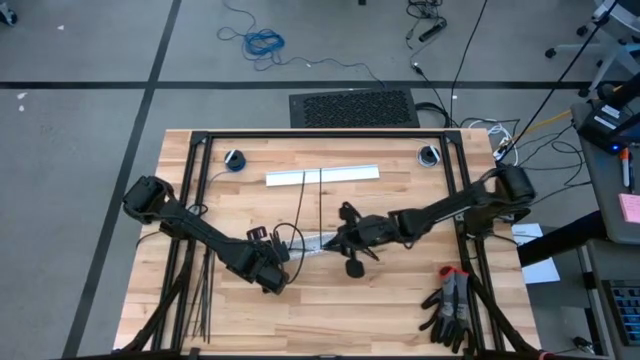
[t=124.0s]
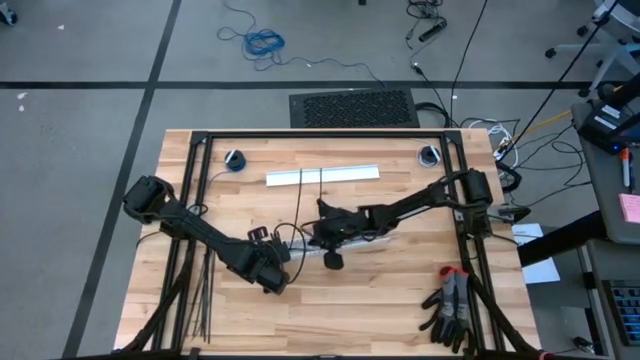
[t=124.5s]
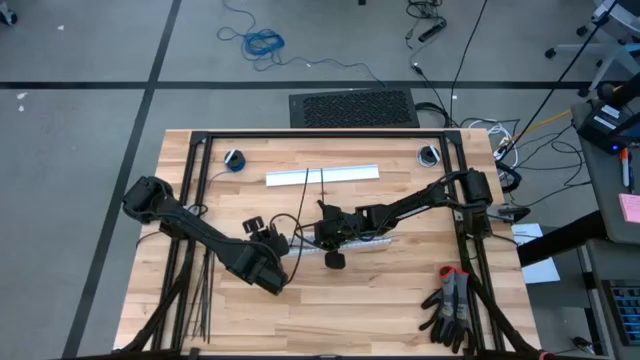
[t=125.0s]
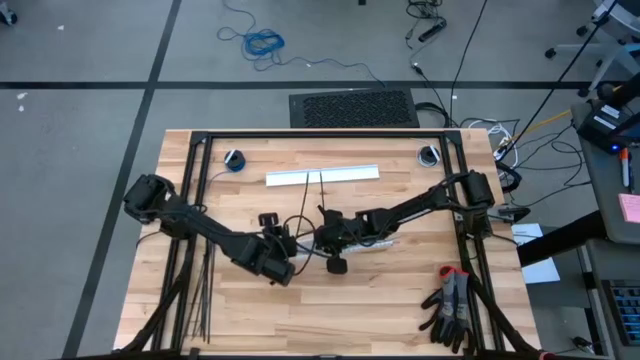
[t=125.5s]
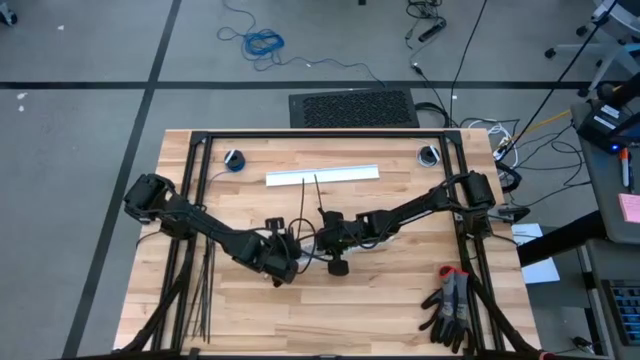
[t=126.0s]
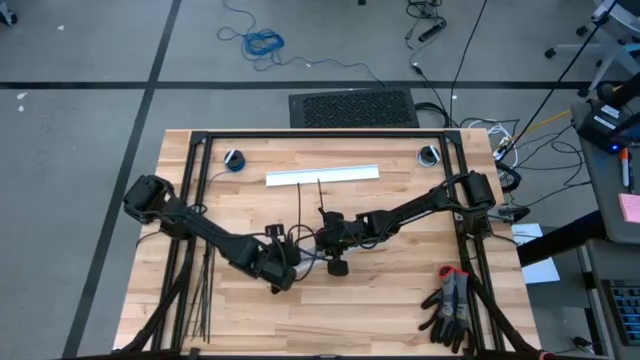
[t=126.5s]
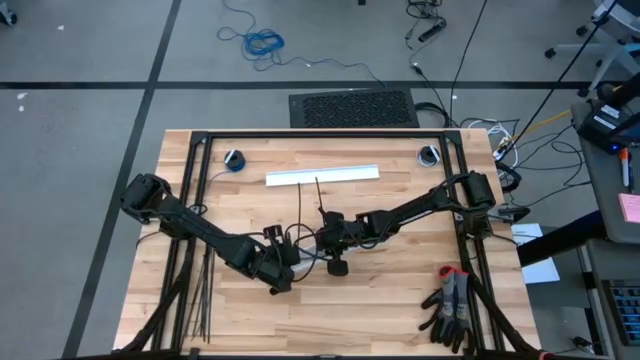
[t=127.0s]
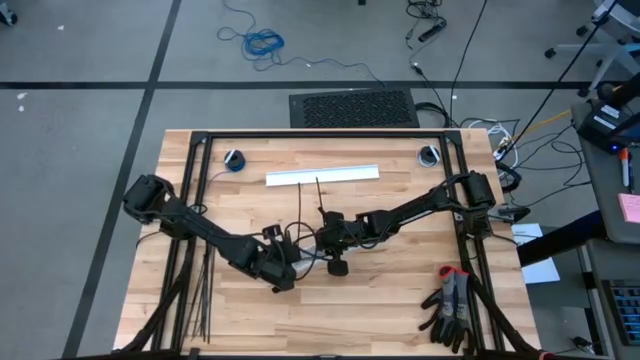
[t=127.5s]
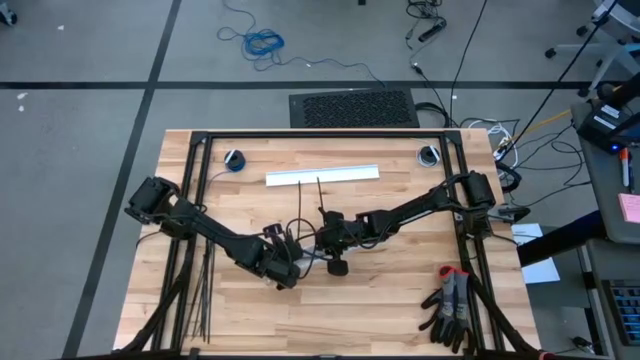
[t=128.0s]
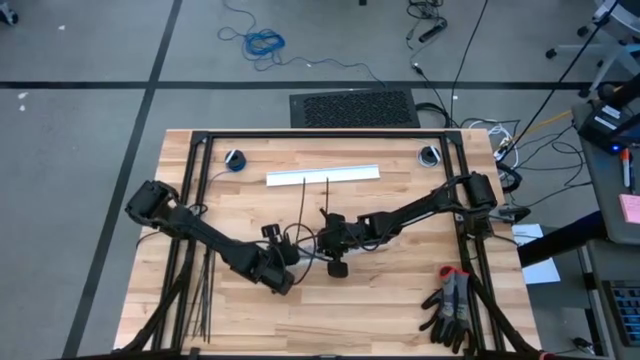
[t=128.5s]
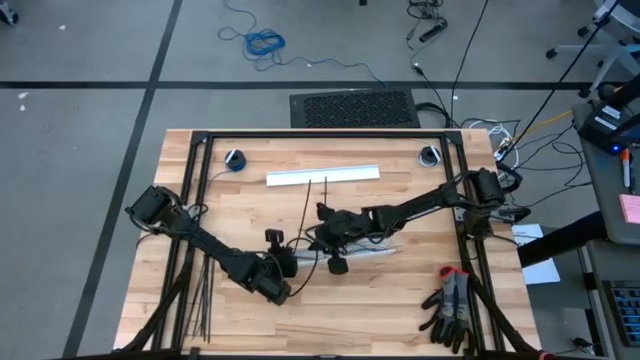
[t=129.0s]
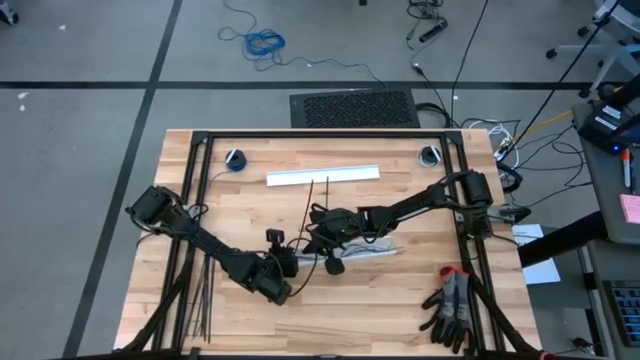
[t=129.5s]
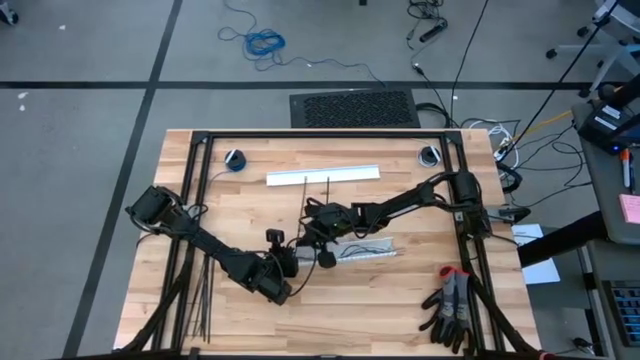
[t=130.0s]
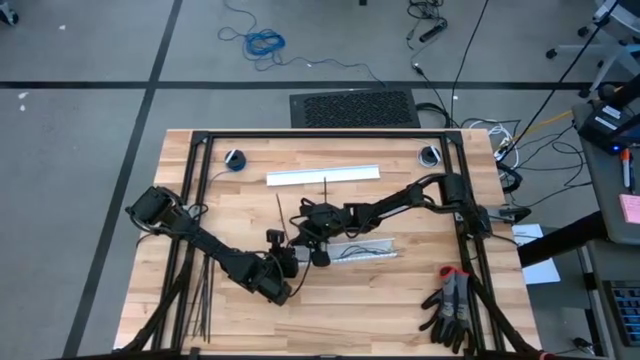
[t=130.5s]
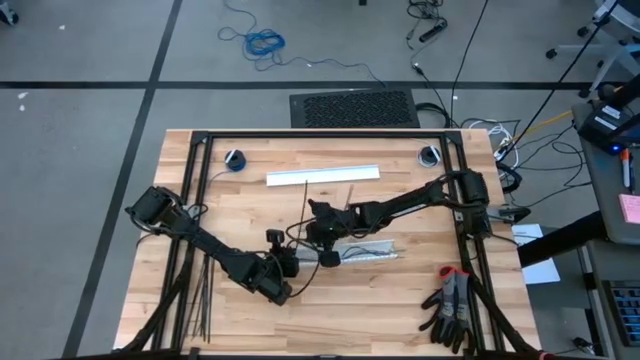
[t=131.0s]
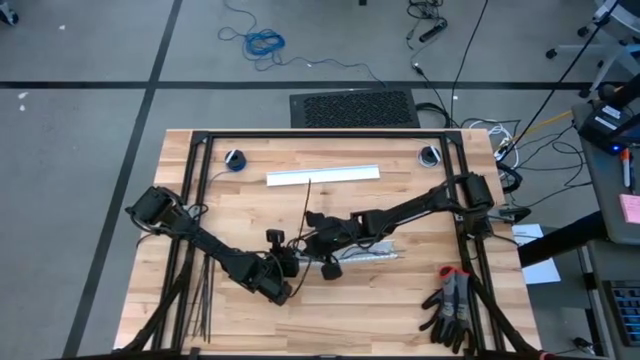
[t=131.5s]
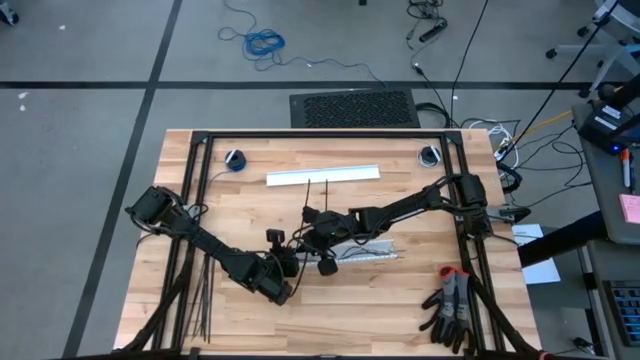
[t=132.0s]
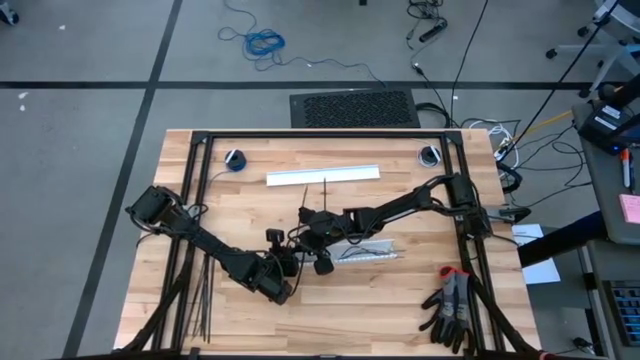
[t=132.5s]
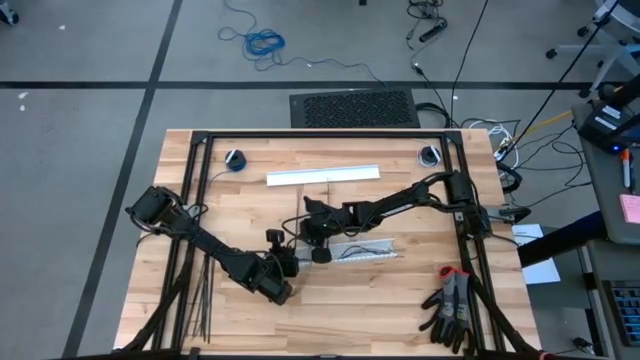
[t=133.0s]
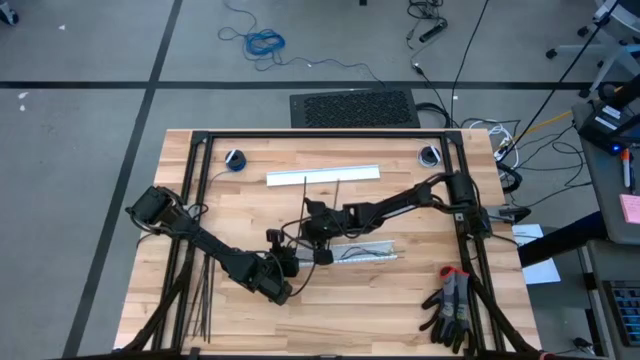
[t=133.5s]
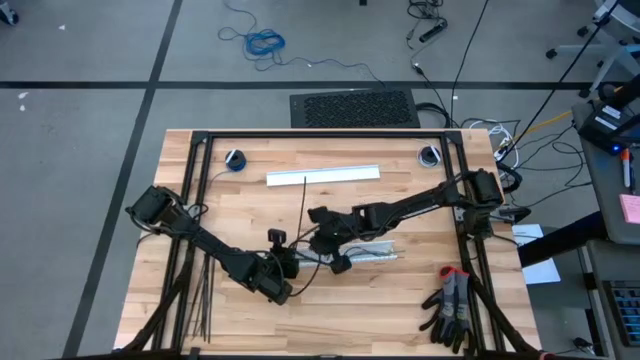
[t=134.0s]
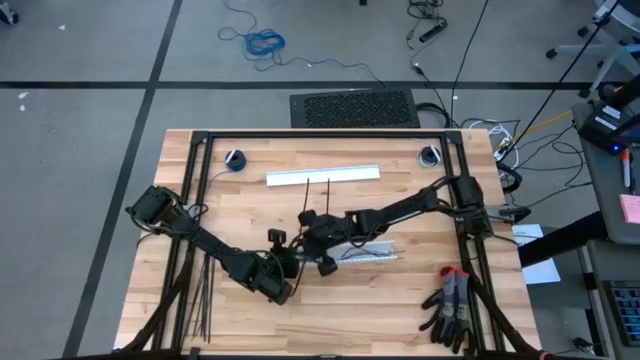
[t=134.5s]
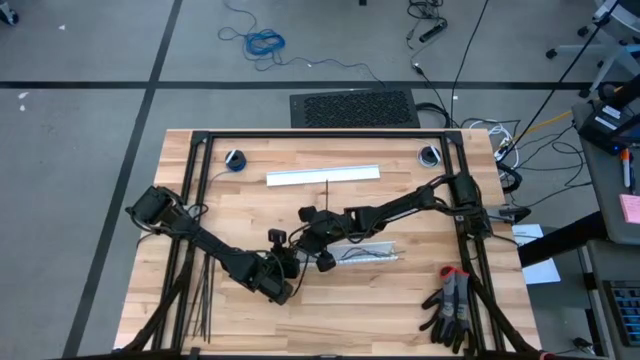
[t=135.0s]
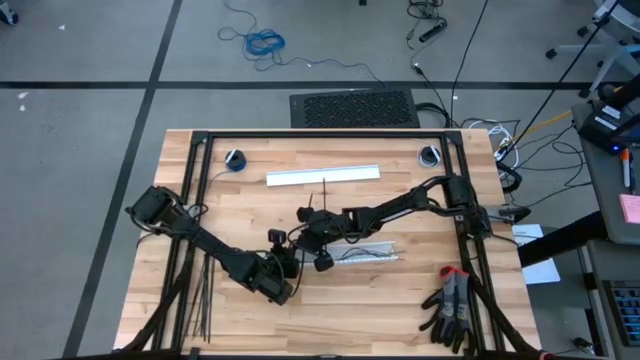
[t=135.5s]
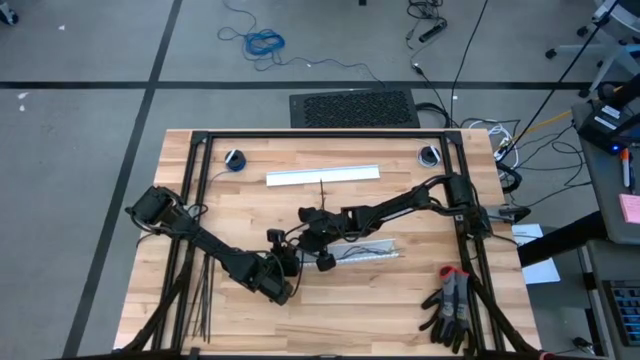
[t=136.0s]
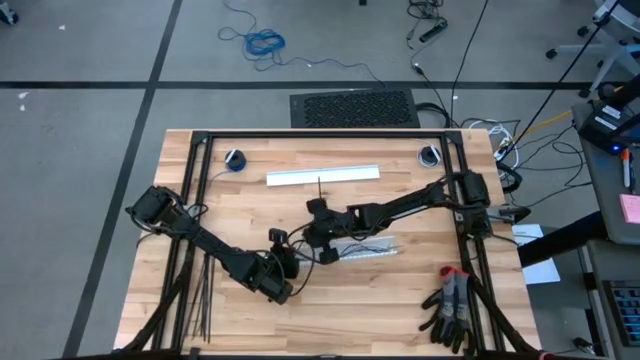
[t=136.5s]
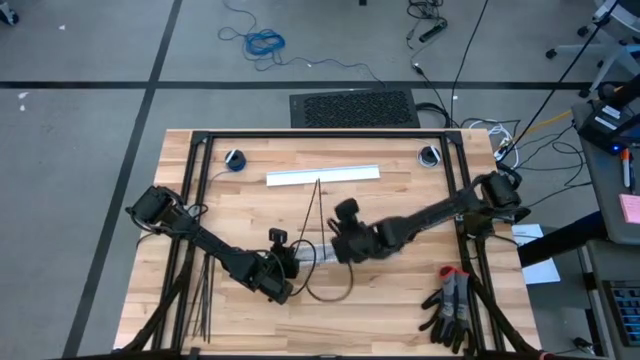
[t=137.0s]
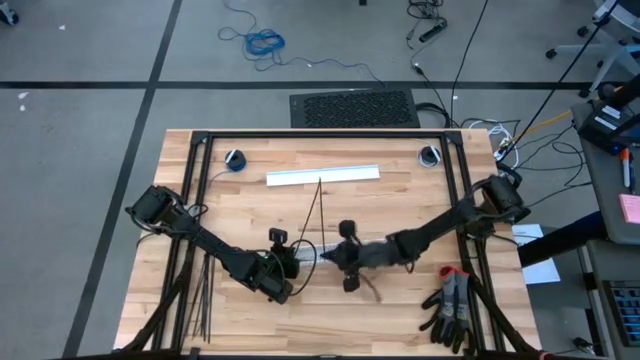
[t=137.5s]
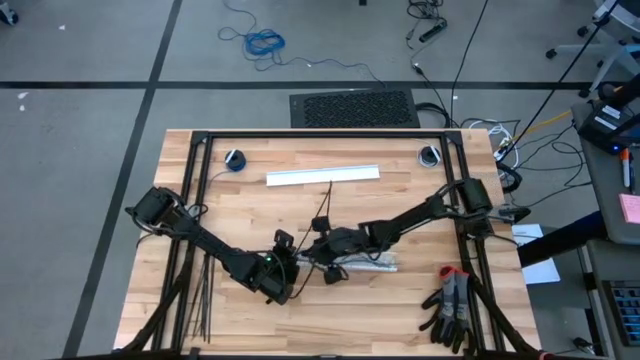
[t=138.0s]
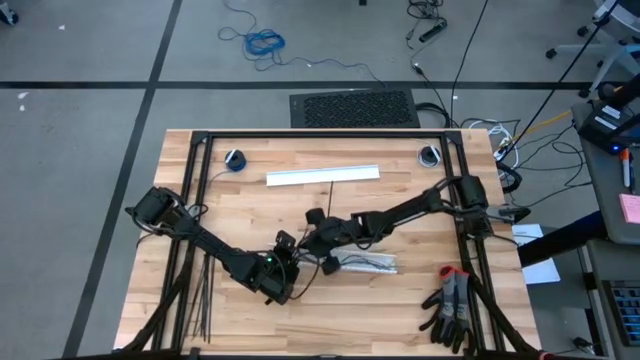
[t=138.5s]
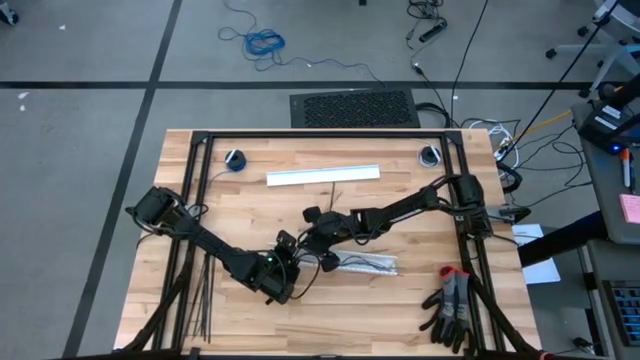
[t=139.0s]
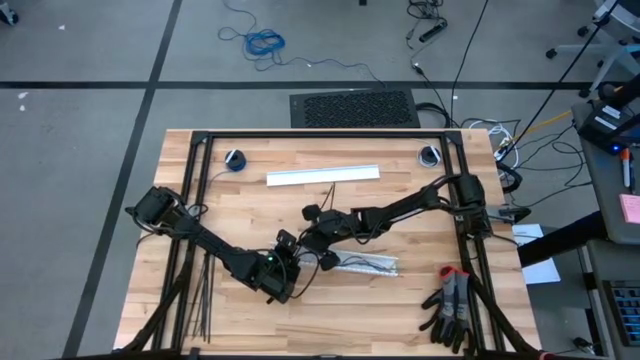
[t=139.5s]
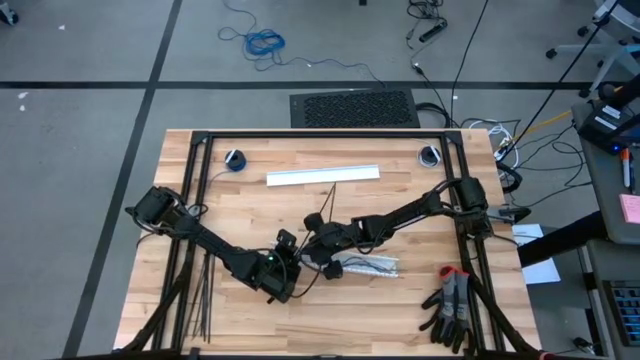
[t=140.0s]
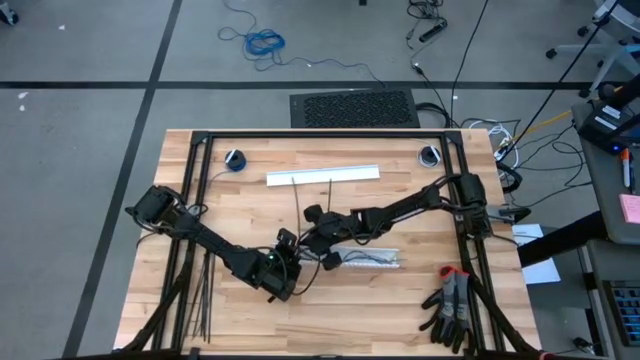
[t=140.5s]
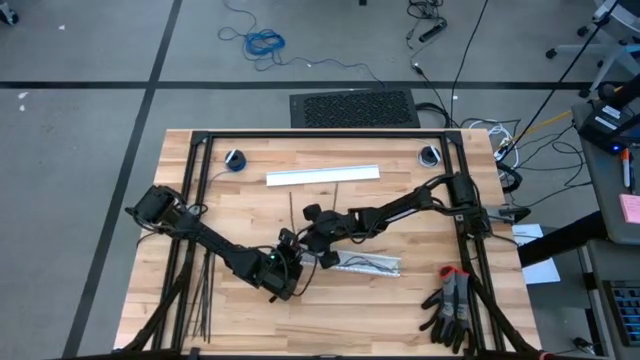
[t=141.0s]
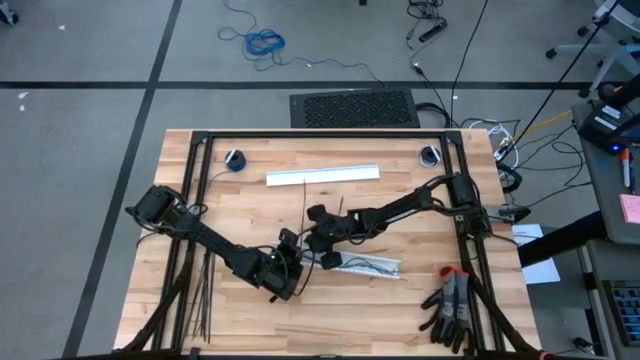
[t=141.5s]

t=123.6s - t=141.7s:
Task: Ziptie cables
Put the zip-tied cables into the white cable duct

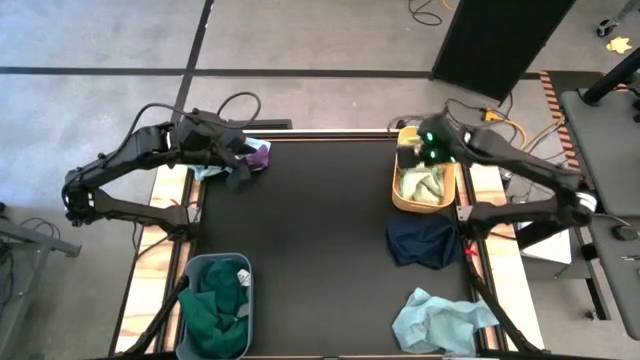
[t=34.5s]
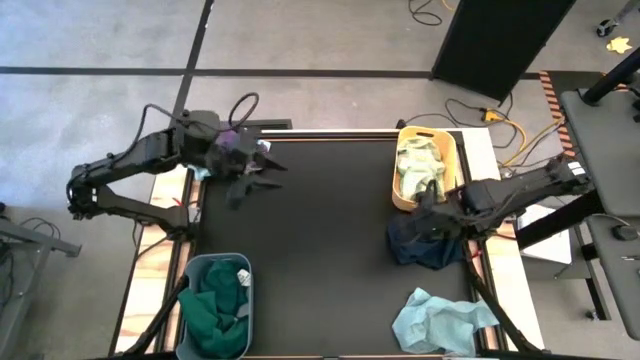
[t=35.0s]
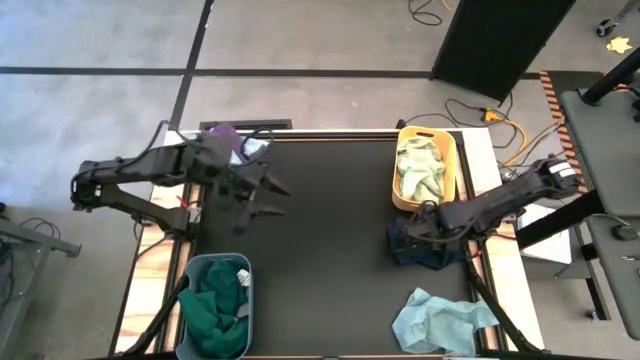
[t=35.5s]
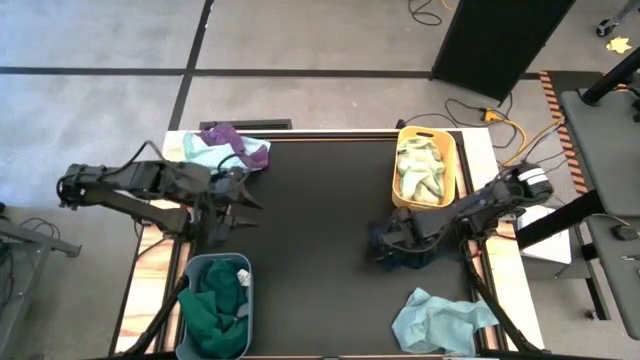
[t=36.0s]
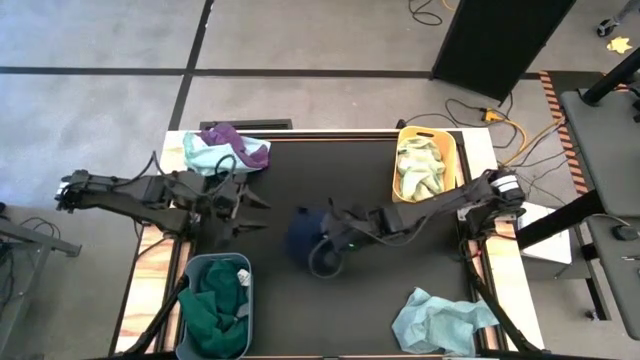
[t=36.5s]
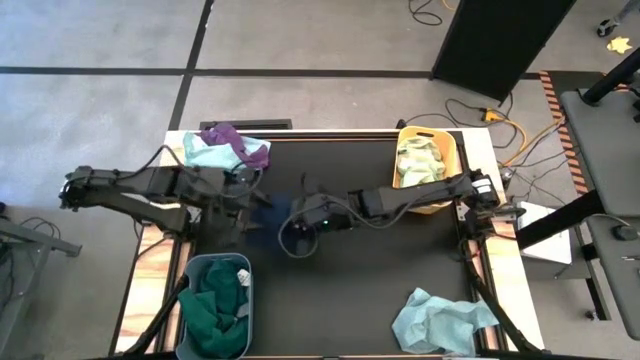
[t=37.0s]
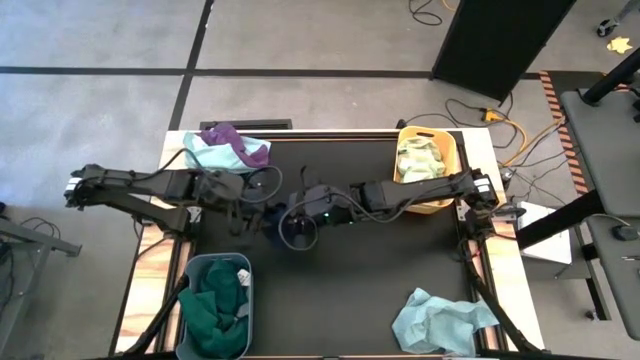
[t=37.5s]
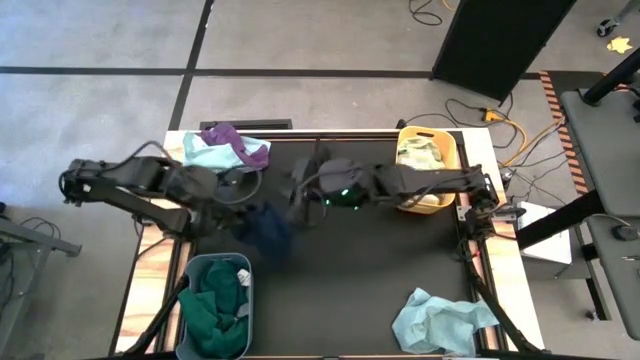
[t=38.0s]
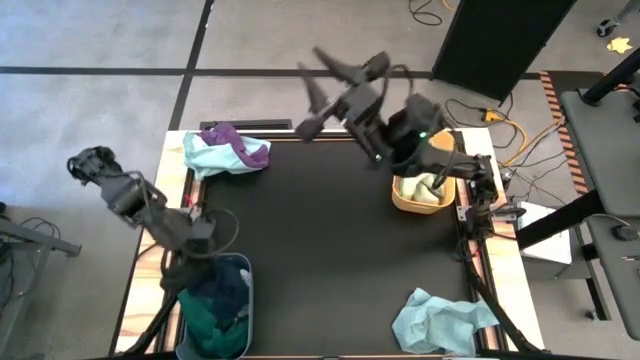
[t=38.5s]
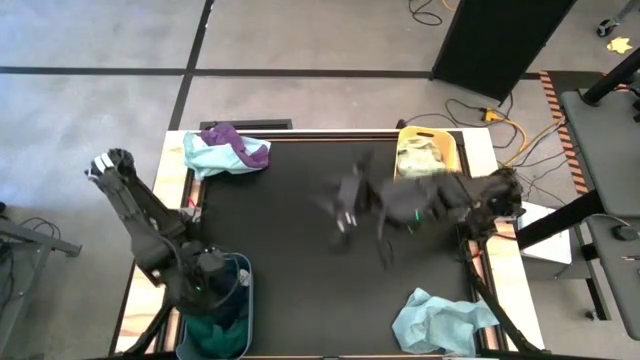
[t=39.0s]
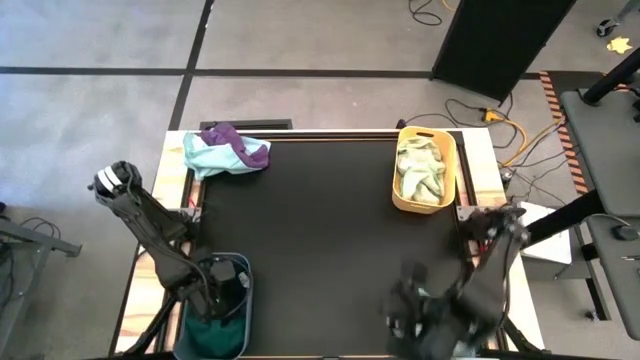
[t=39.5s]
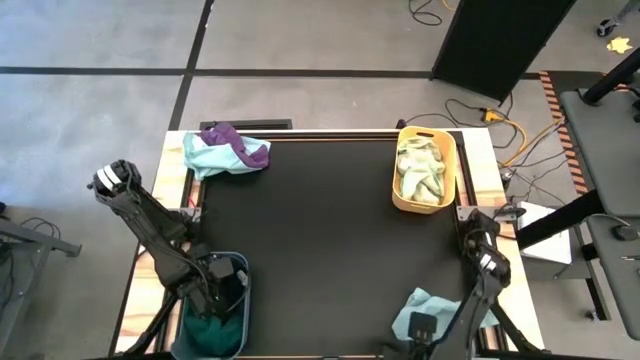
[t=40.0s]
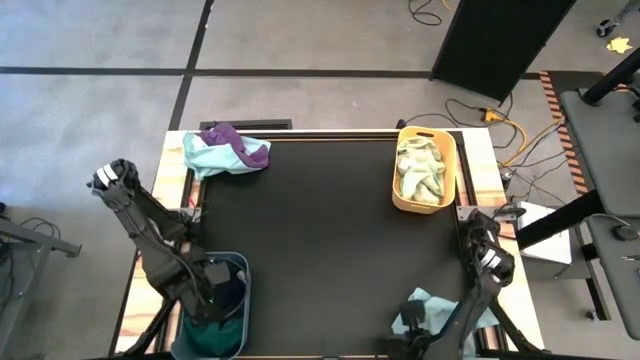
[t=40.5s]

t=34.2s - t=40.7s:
Task: Sort microfiber towel by color & place in baskets
Put the dark blue microfiber towel into the green bin
